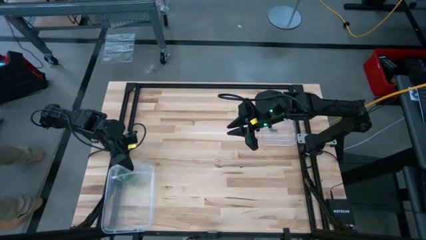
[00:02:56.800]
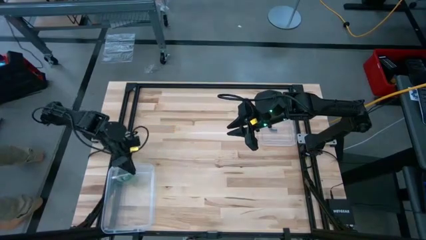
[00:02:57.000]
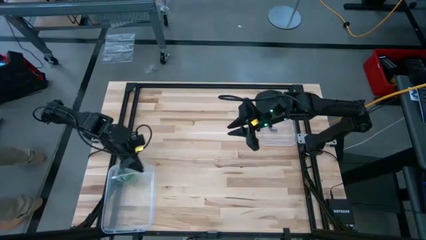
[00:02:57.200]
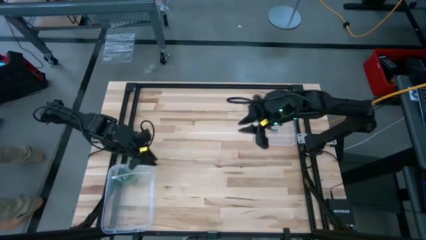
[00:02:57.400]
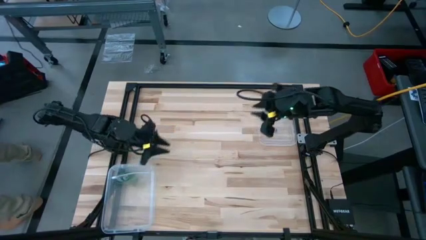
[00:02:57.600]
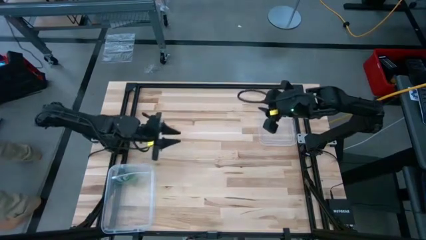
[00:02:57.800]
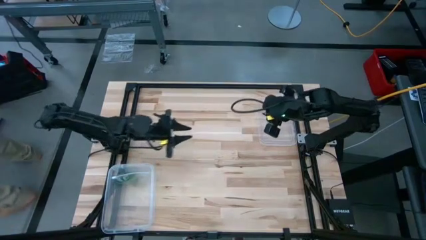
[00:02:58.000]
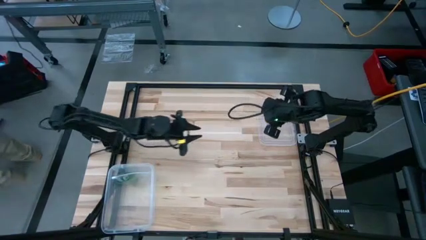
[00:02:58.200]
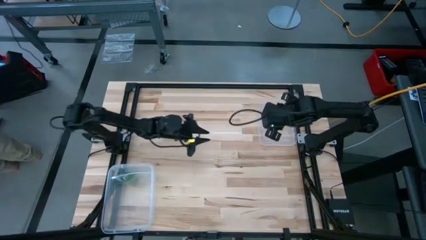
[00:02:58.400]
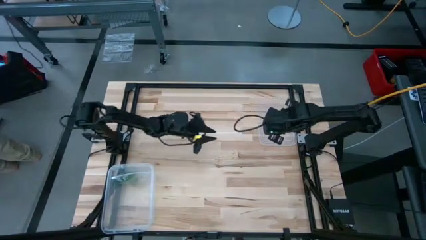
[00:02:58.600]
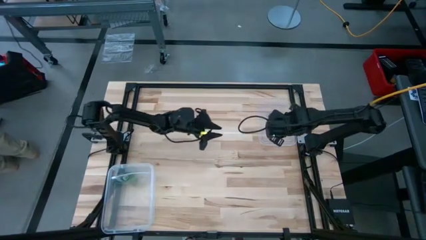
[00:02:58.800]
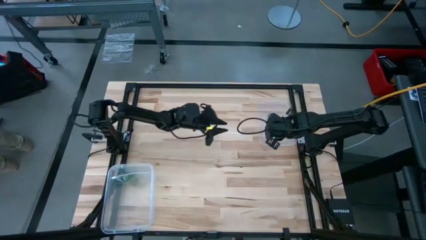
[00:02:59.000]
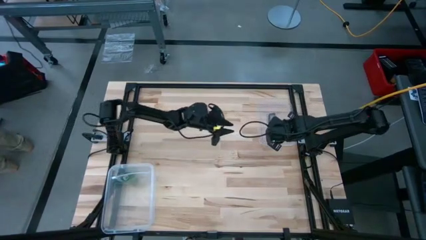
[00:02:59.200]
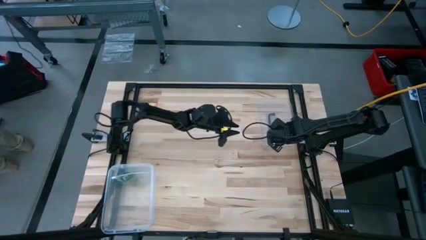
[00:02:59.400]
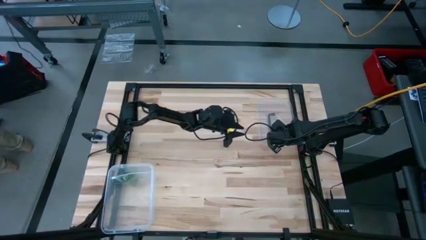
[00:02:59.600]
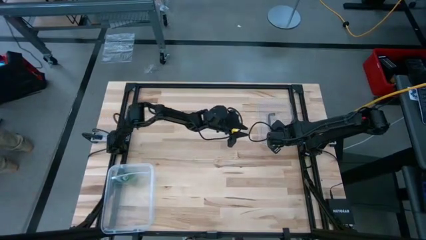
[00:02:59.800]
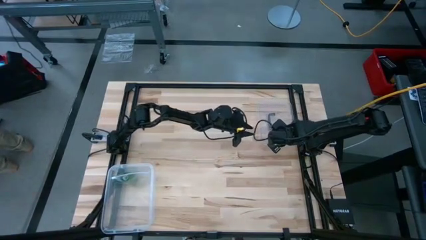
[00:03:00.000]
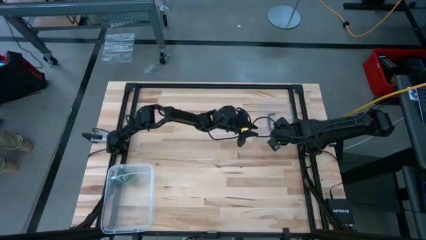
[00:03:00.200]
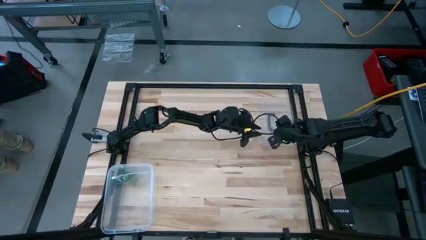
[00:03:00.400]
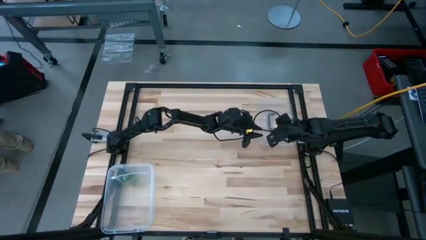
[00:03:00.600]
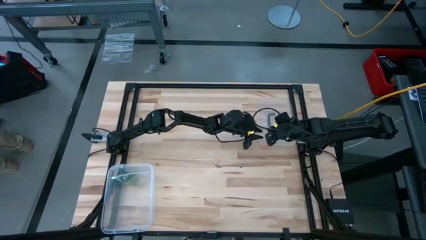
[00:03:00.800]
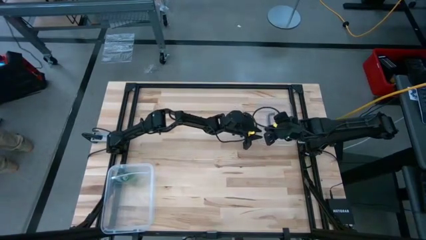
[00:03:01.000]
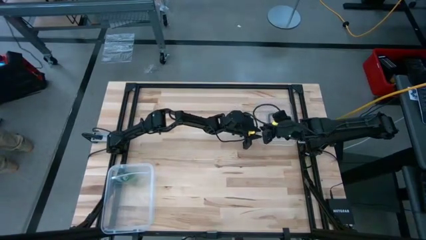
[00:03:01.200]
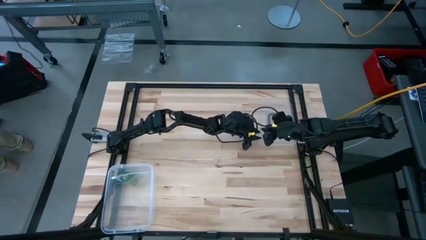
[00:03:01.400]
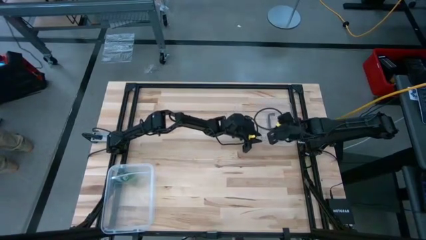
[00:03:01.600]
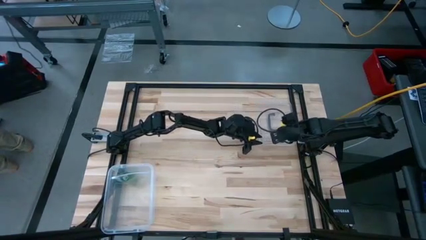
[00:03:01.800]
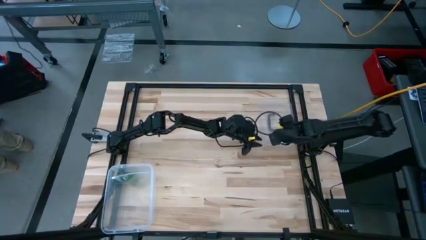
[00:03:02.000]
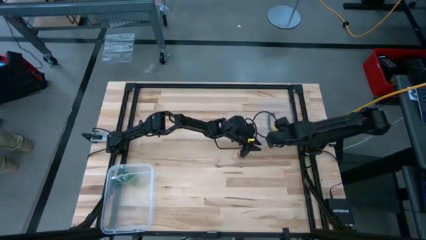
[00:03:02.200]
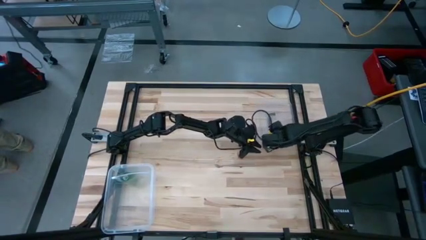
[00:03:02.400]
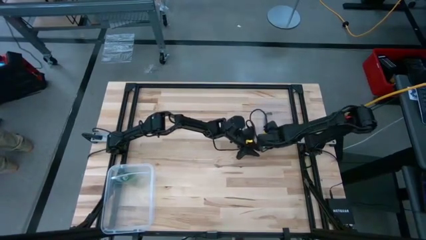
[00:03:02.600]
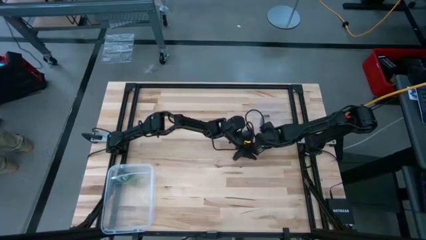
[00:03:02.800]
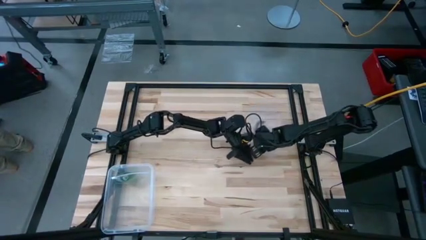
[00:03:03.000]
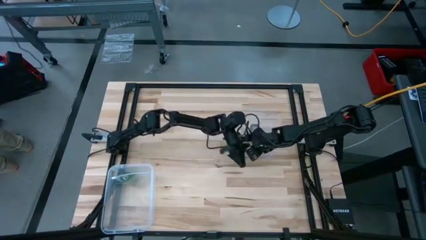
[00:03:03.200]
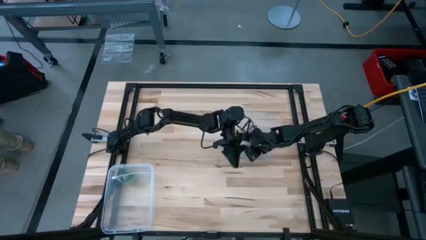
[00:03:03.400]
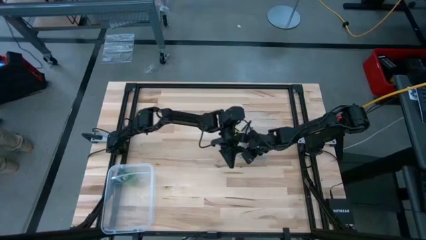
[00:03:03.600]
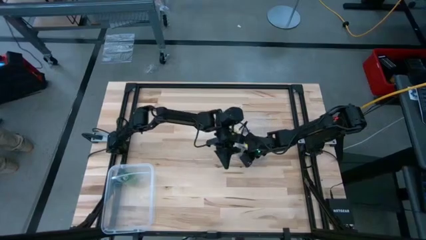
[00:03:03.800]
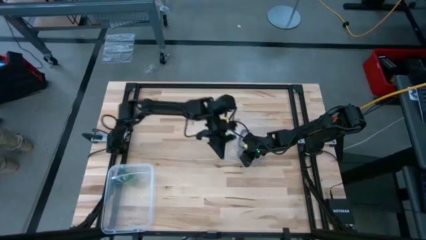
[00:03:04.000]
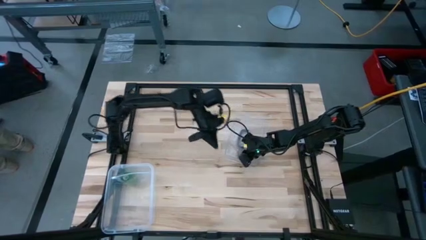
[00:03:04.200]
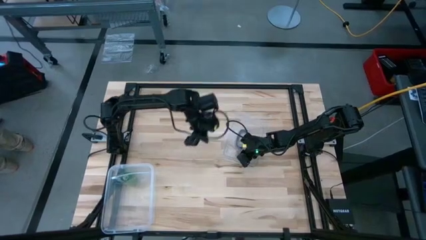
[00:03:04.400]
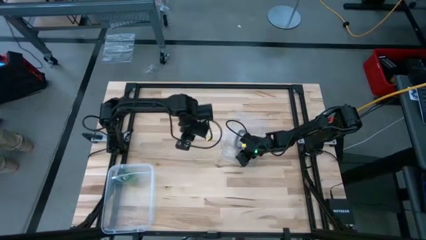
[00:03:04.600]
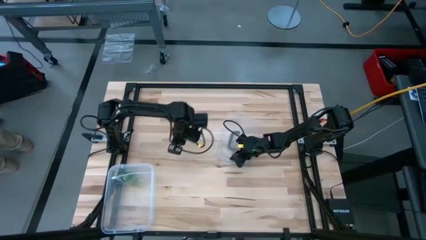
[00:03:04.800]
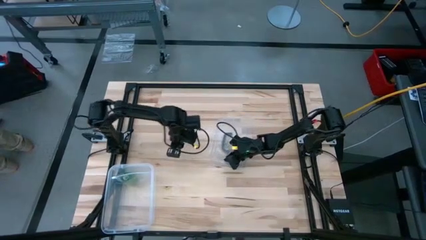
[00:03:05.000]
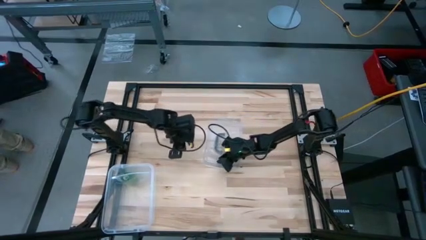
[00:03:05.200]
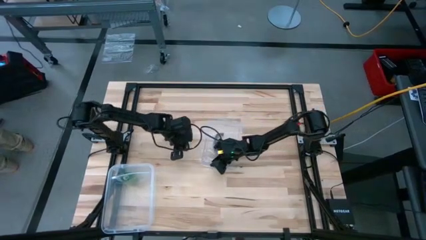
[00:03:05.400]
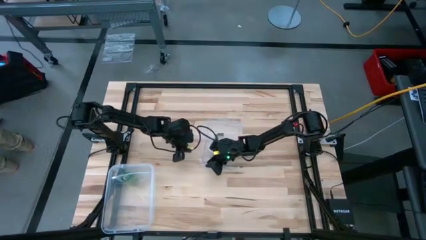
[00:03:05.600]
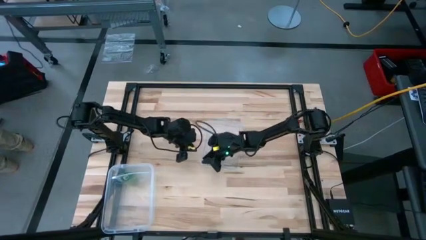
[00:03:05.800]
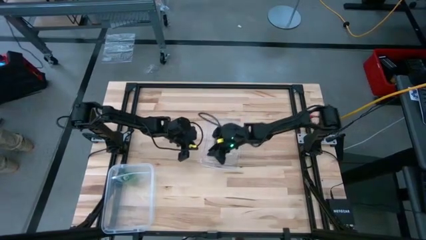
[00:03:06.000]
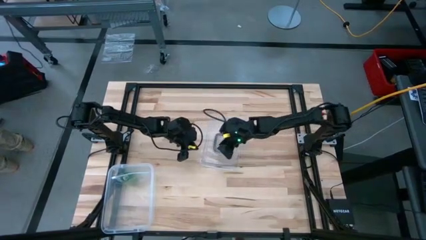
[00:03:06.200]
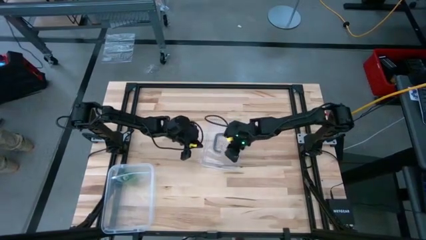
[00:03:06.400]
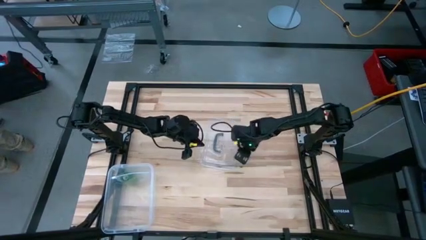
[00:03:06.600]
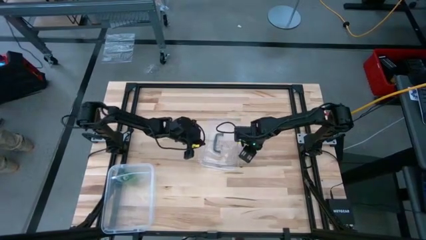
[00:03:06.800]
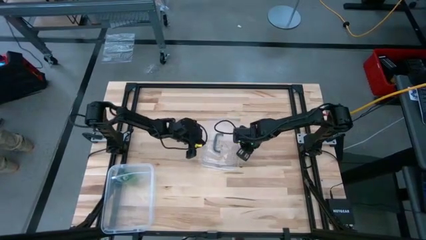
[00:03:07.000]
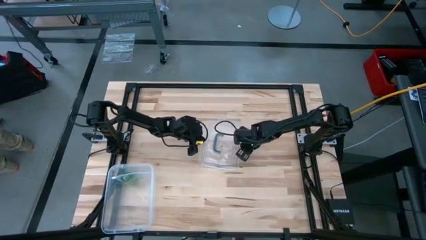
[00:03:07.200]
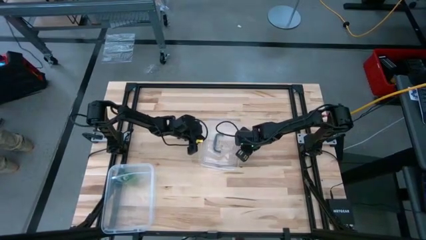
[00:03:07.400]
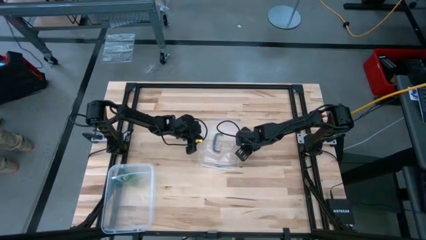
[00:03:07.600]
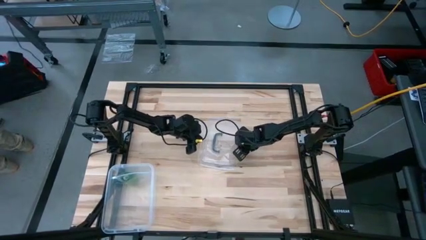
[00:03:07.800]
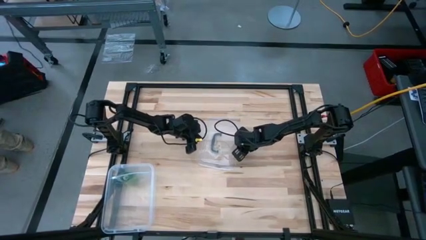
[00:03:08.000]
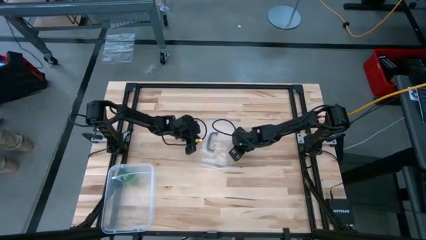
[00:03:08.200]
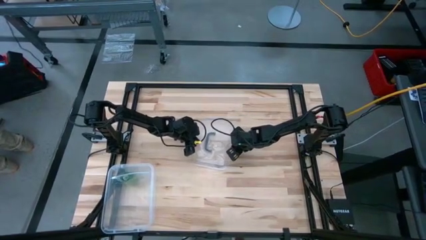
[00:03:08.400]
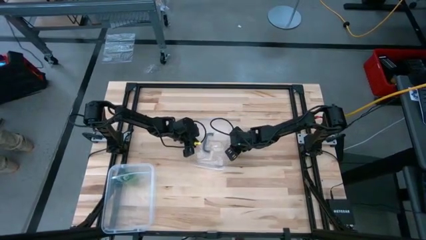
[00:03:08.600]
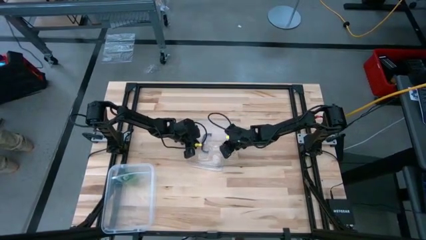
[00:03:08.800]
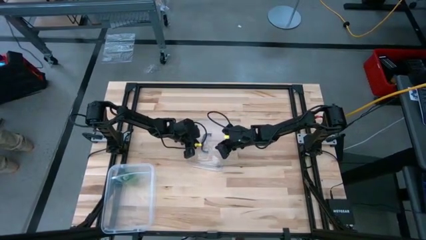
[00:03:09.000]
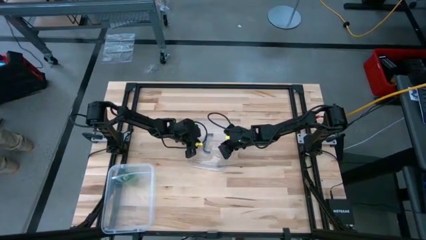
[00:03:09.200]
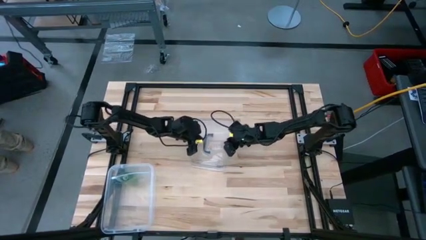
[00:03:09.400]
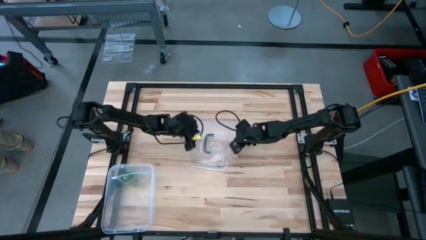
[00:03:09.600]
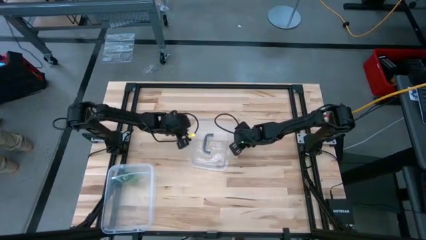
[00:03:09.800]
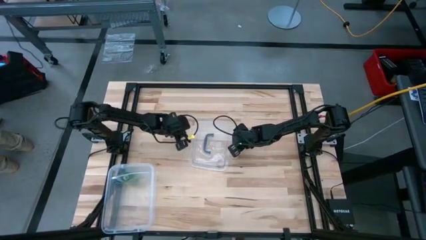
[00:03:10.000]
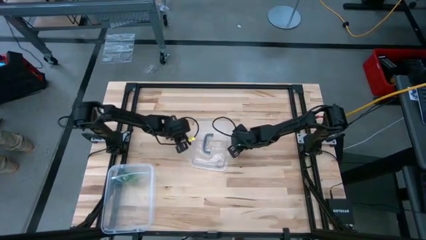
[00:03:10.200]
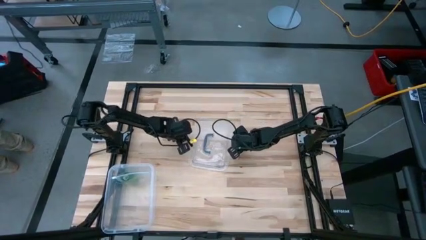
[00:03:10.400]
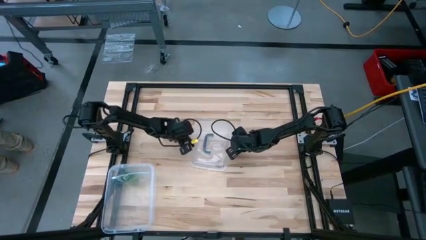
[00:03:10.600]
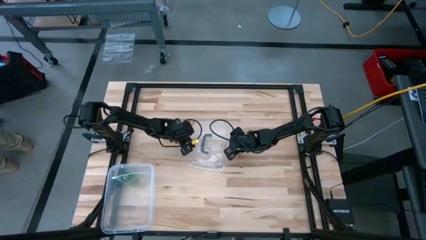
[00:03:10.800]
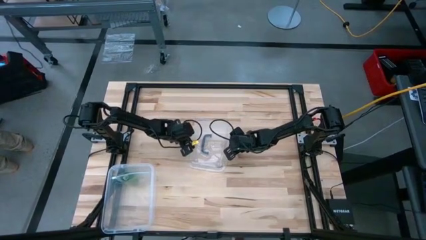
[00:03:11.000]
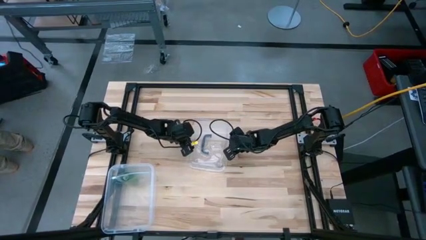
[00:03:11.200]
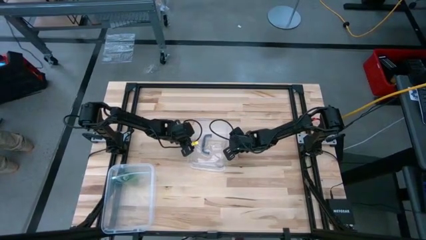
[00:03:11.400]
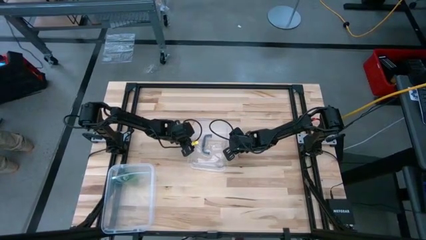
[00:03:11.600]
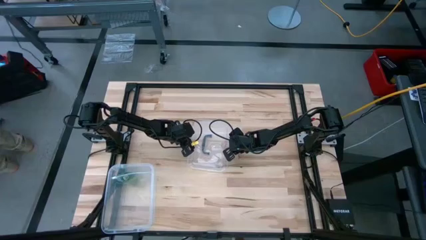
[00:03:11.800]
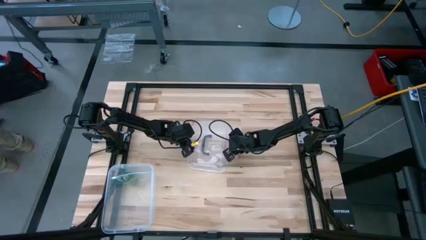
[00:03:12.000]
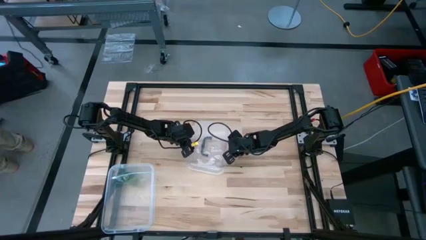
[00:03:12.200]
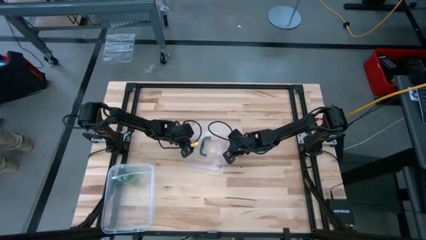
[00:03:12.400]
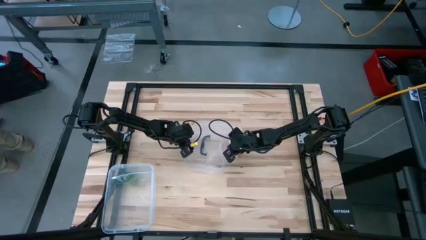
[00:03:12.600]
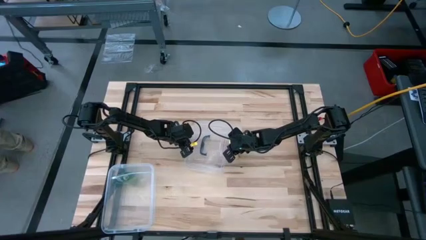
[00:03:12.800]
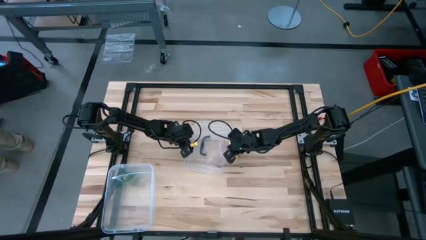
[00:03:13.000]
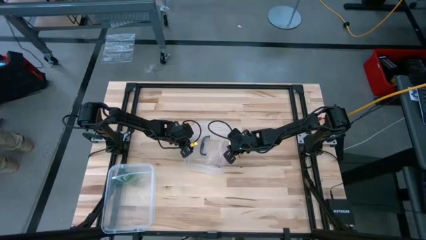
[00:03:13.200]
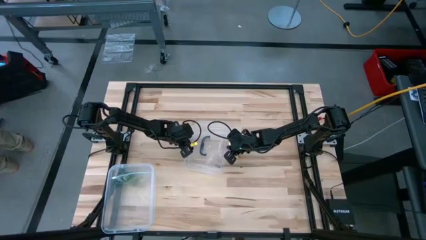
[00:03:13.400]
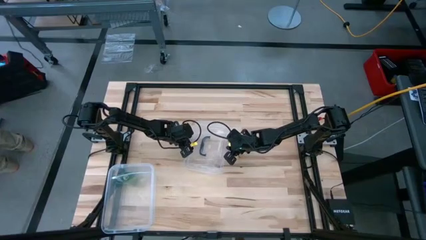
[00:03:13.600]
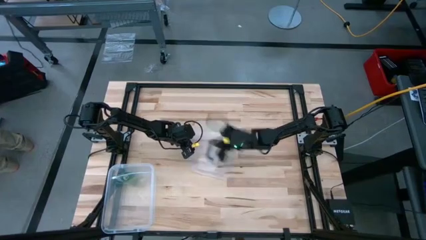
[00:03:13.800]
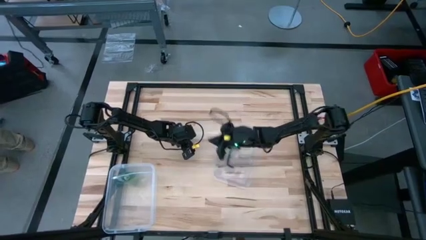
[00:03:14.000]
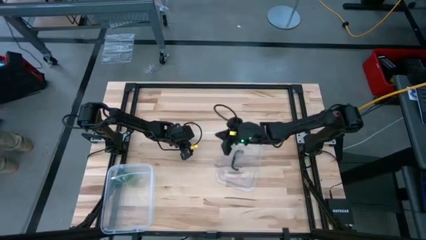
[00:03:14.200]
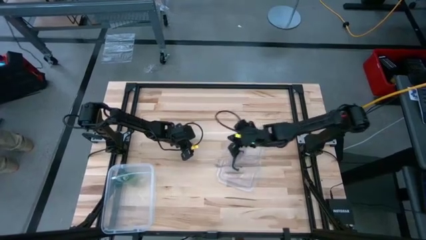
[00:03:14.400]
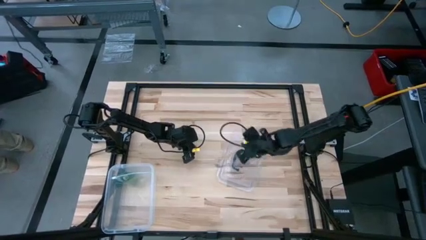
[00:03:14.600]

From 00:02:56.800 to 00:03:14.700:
Task: Roll bandage
Put the transparent lid on the transparent bin
